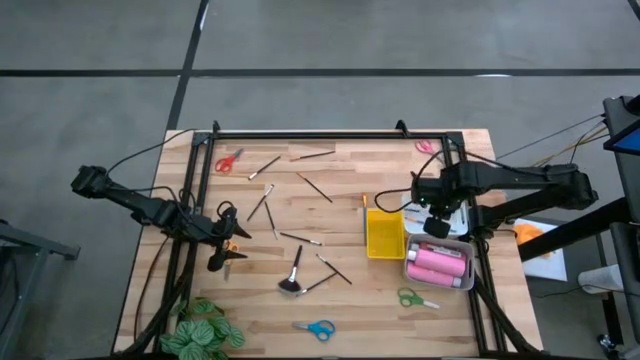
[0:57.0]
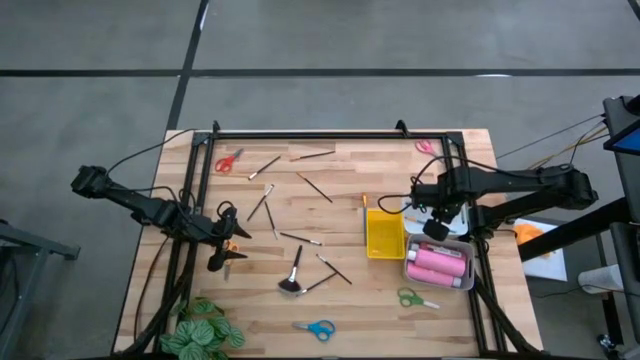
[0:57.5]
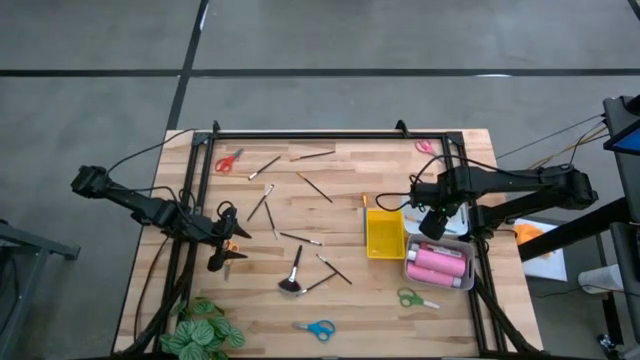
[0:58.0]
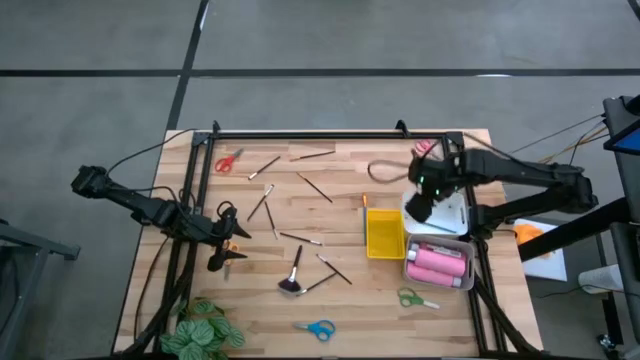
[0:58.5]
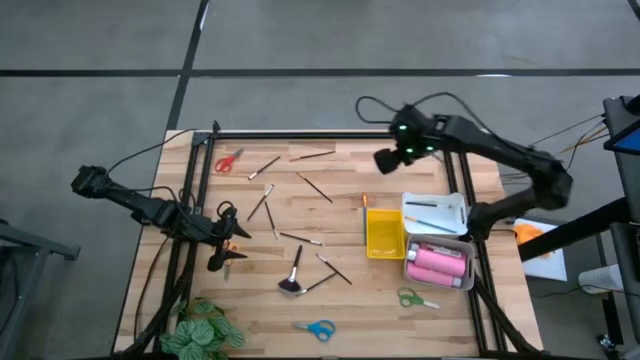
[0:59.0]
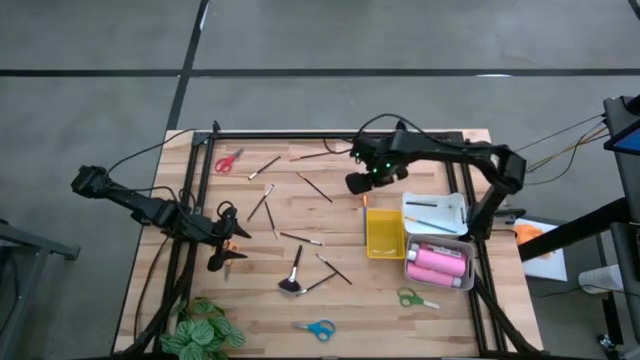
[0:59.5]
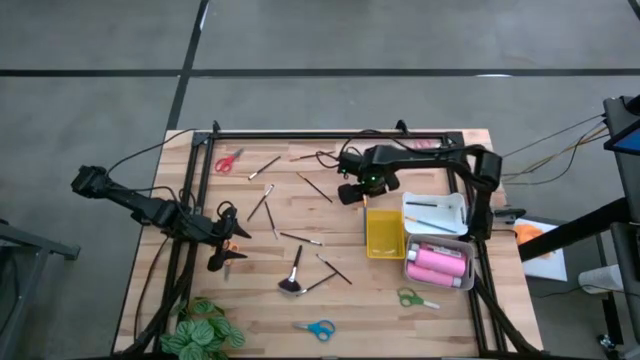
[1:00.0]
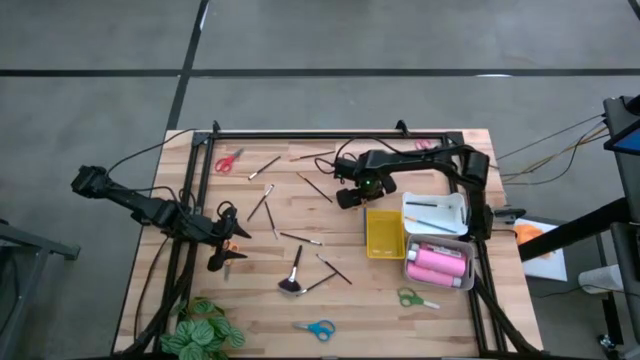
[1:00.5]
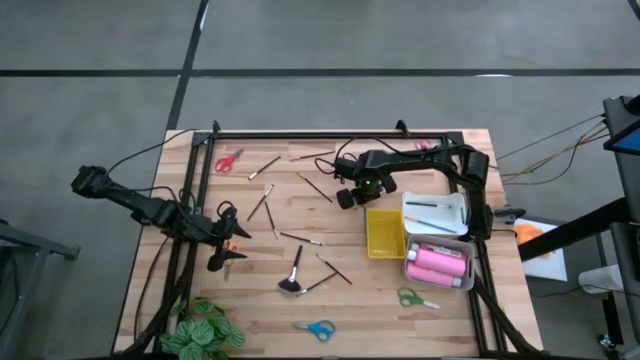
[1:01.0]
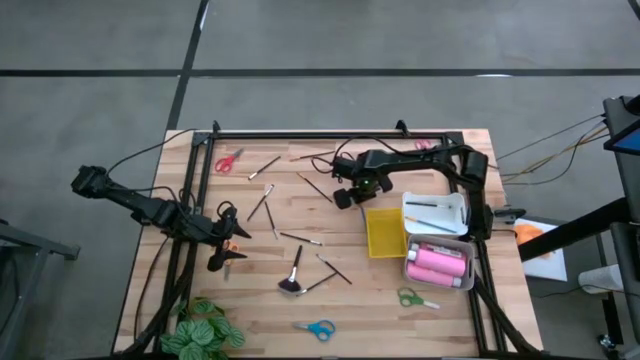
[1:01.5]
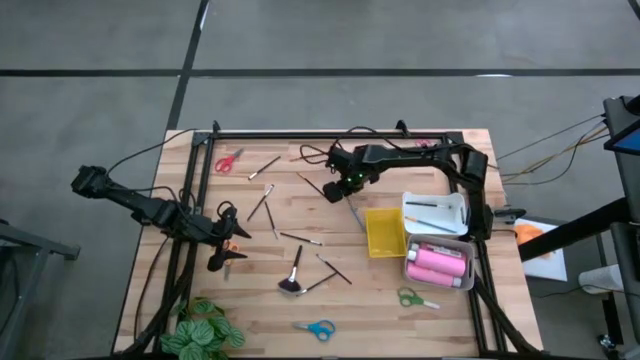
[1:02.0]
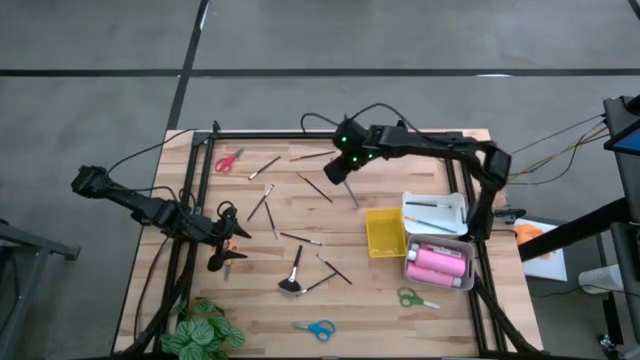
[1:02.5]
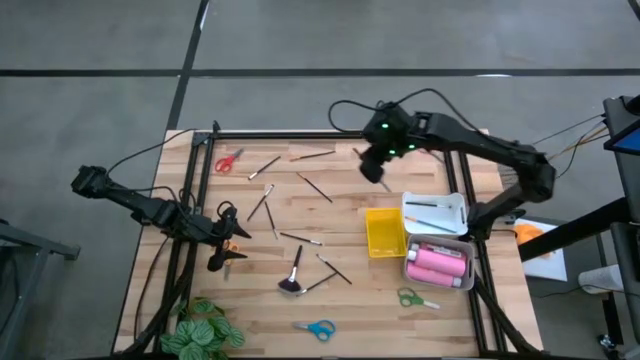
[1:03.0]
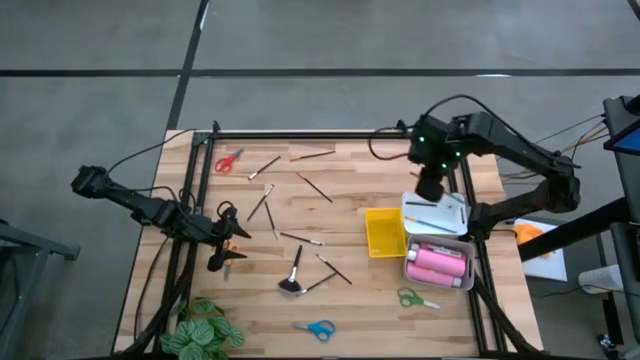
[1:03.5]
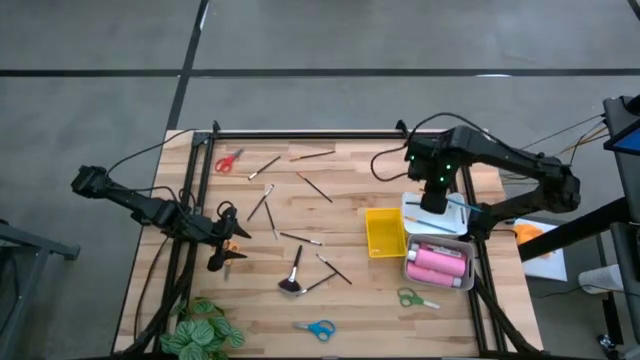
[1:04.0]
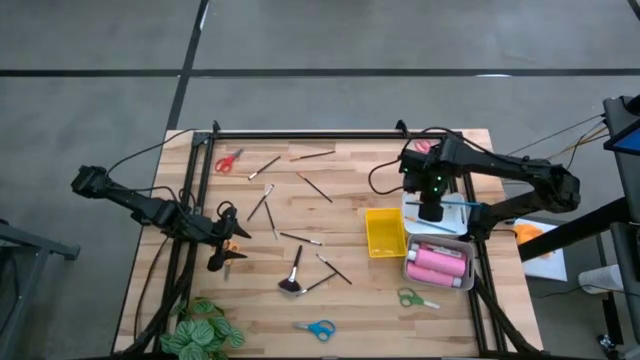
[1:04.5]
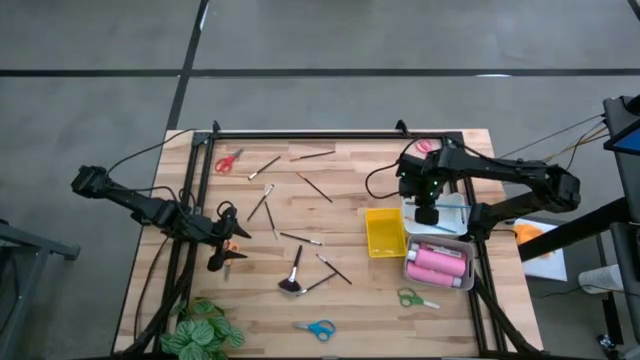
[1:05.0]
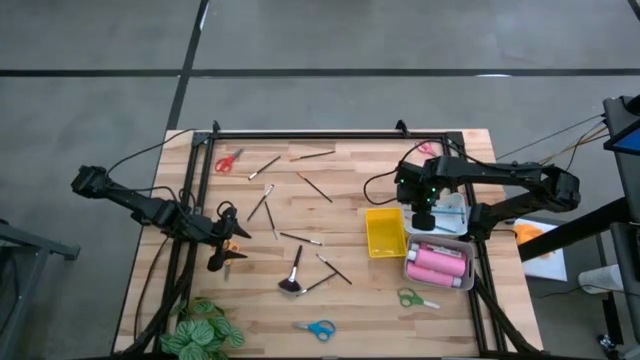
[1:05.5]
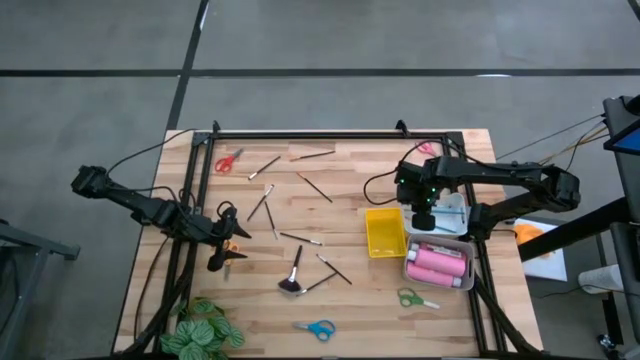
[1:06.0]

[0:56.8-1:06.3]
Task: Pick & Place Paint Supplies
Put the blue paint brush into the white bin

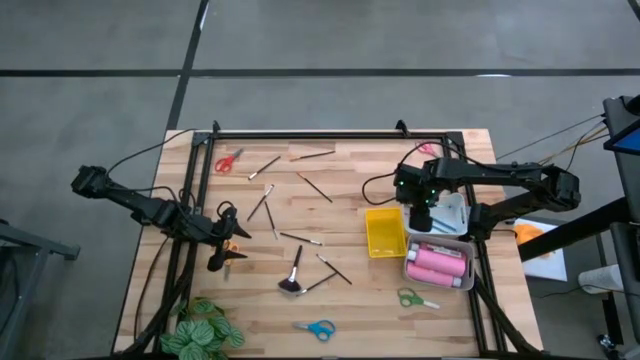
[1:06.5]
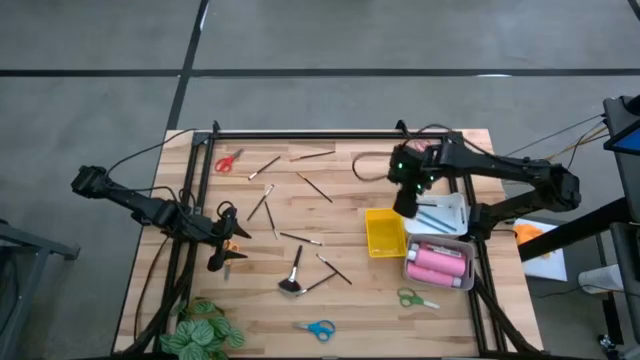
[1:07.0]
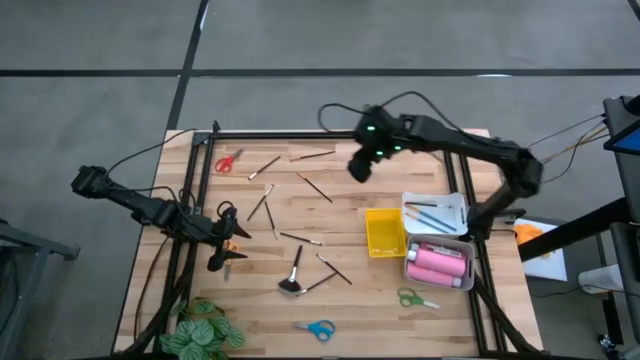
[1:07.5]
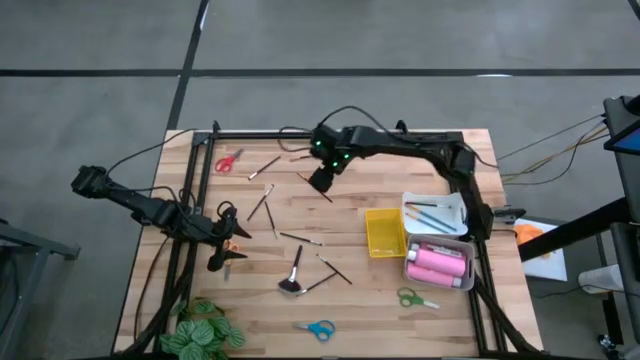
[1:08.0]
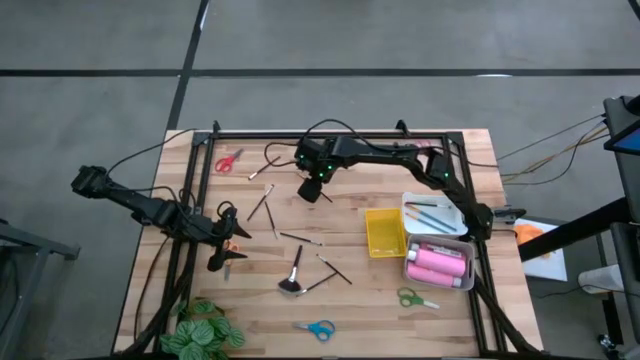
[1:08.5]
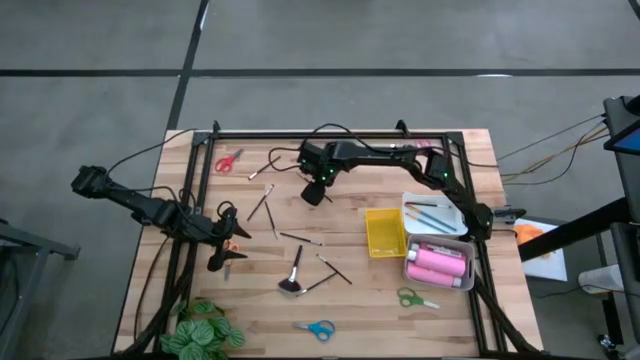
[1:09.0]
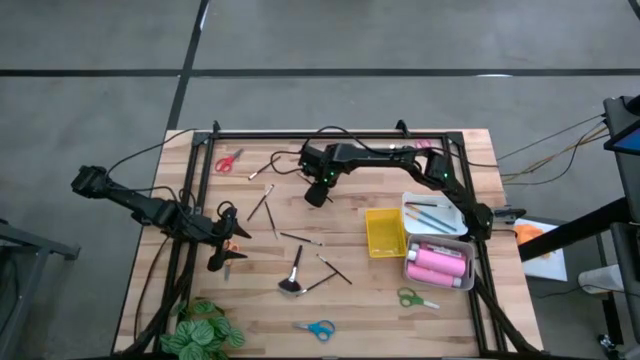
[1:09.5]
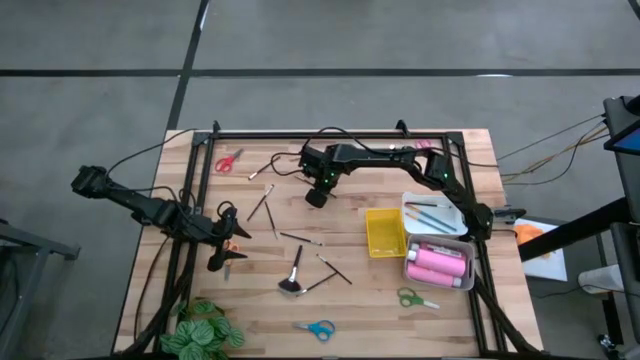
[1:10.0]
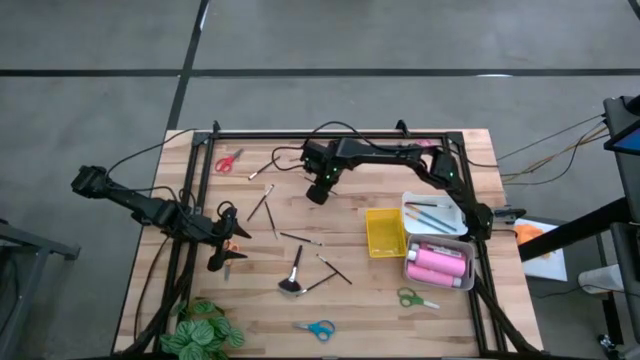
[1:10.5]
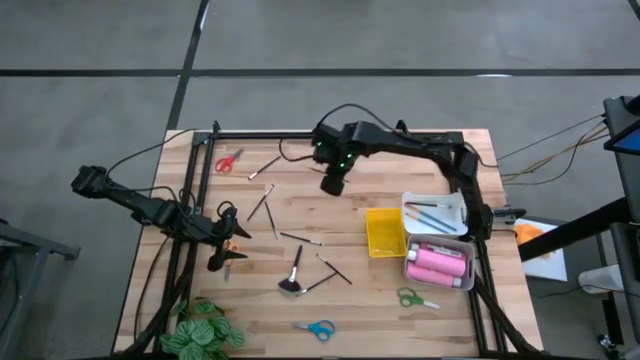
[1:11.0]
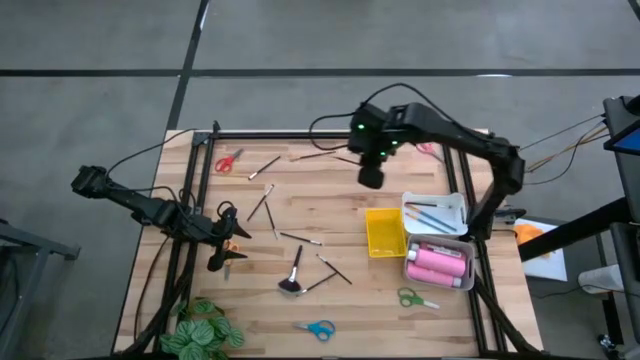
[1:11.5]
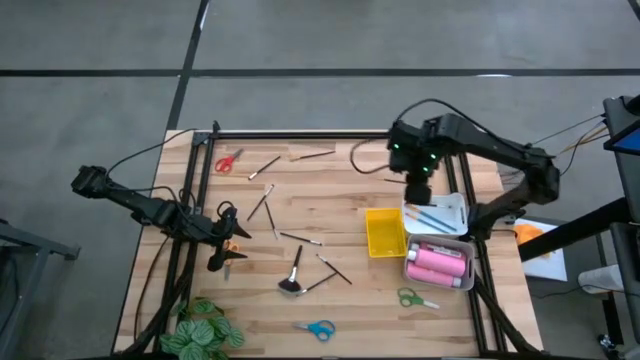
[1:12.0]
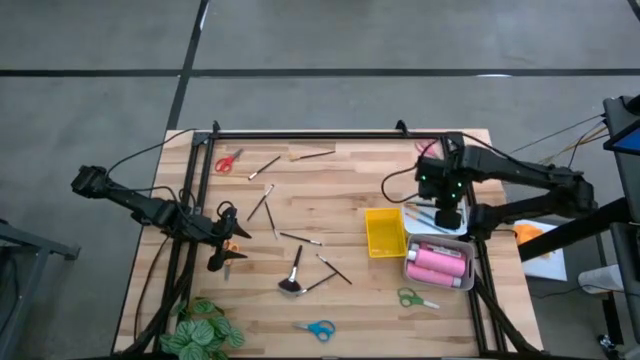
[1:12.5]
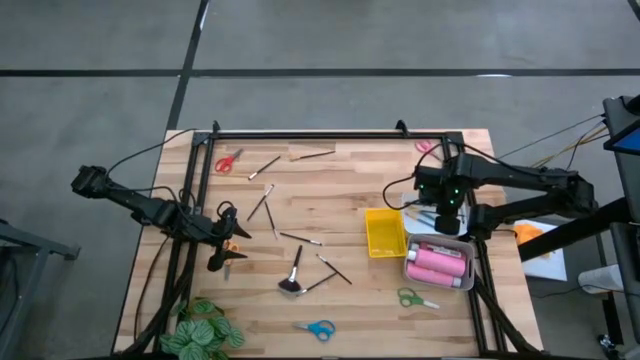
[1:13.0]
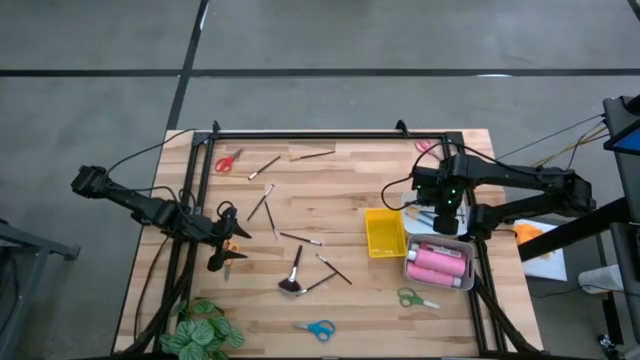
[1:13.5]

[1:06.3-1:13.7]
Put the black paint brush into the white bin

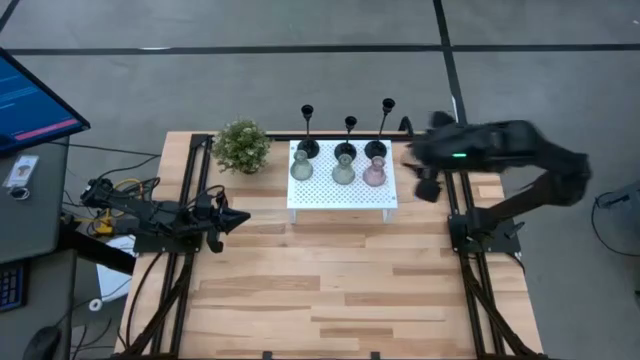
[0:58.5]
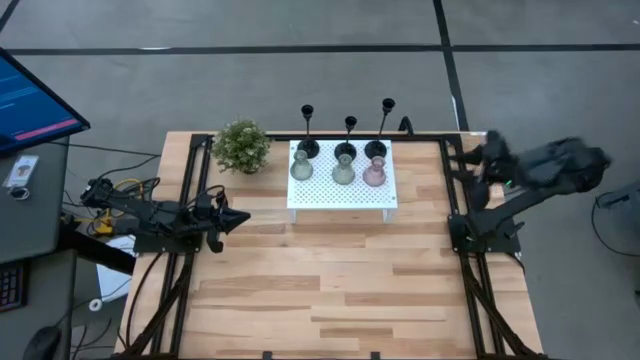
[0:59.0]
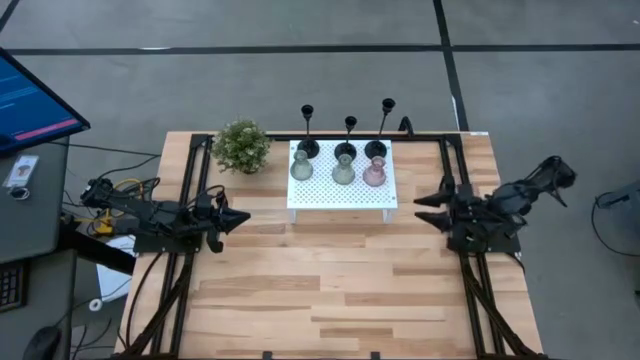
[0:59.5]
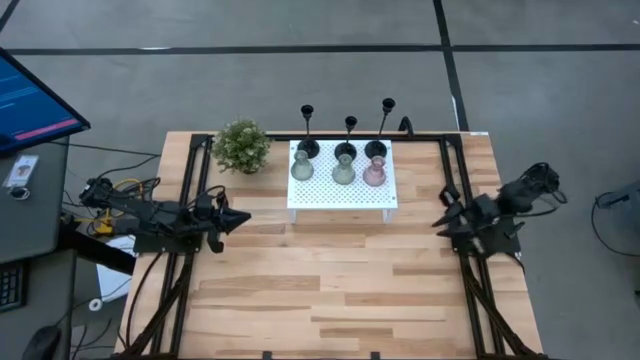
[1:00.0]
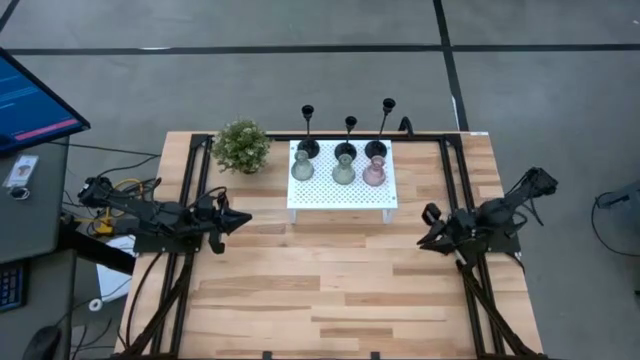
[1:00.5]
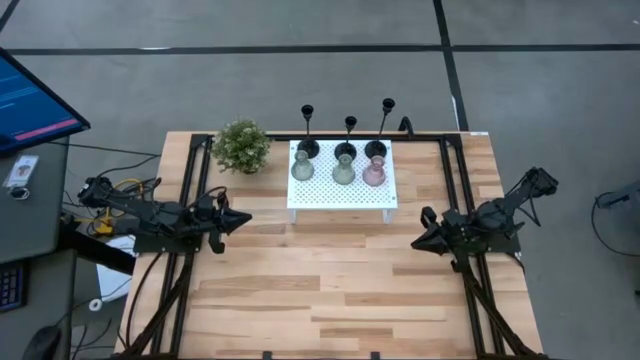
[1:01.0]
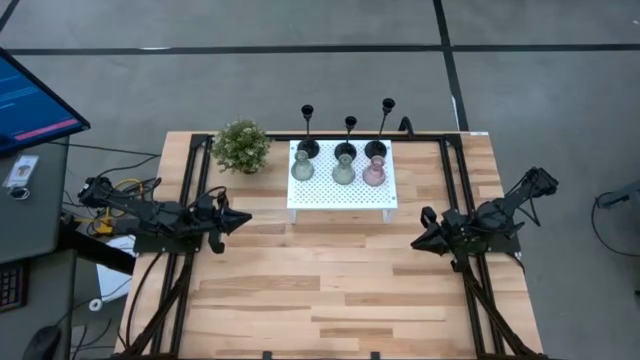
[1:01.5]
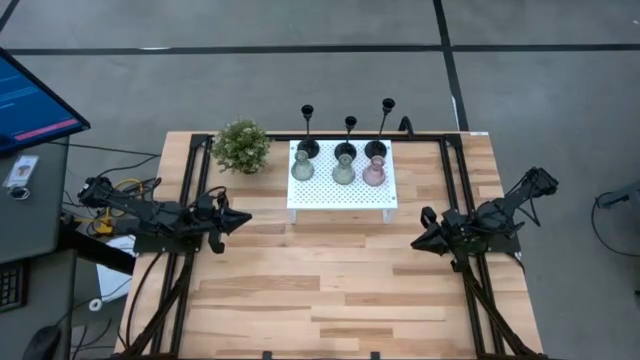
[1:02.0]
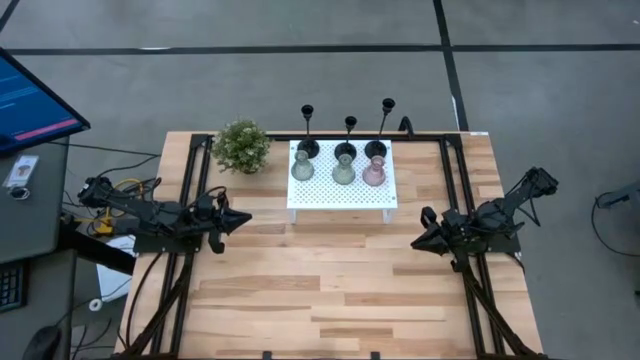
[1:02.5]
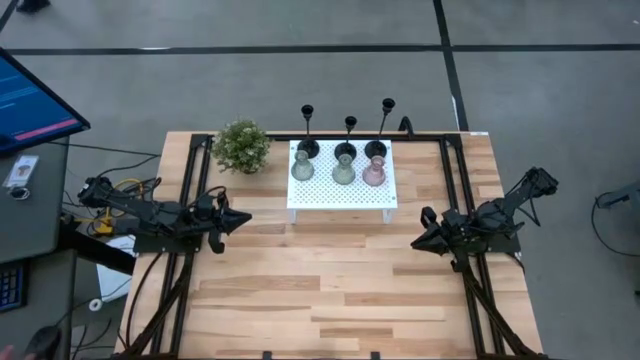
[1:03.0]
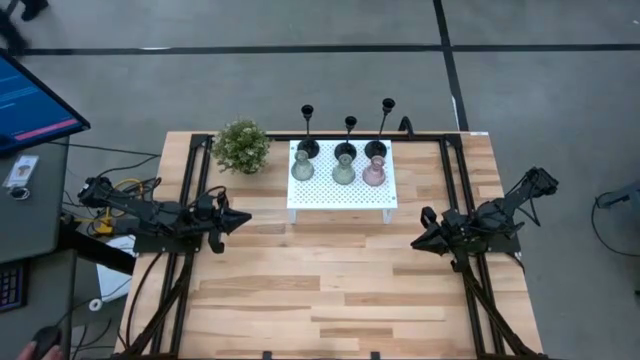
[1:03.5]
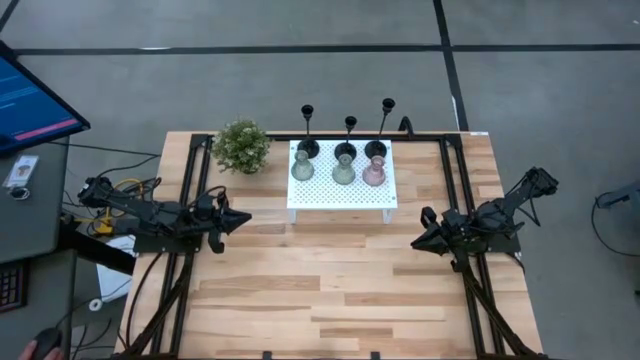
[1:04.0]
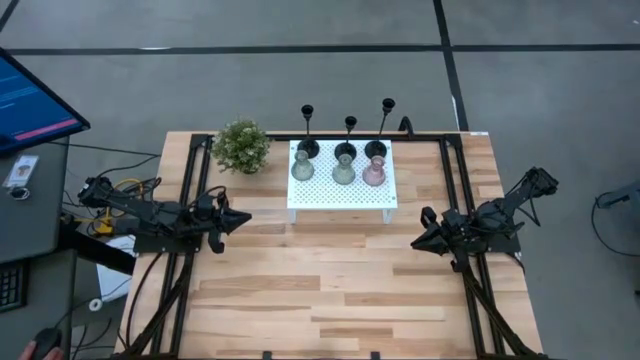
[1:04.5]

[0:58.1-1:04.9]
Task: Pick & Place candle stick holders
Return to Home Position
